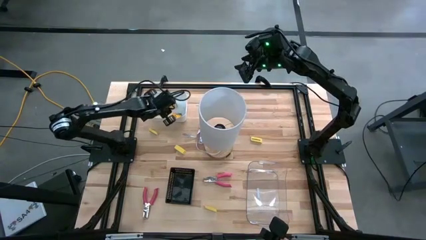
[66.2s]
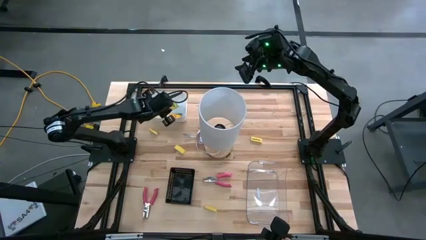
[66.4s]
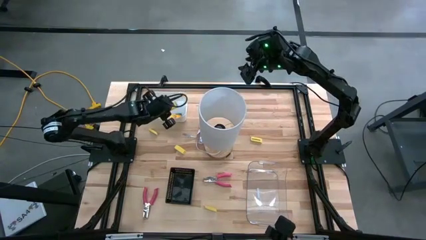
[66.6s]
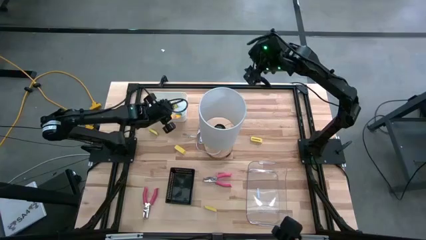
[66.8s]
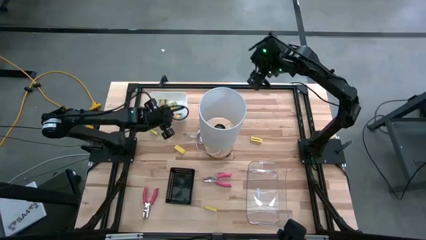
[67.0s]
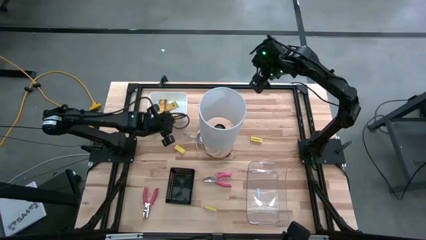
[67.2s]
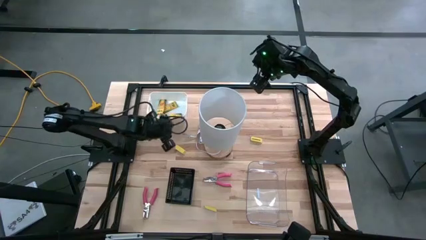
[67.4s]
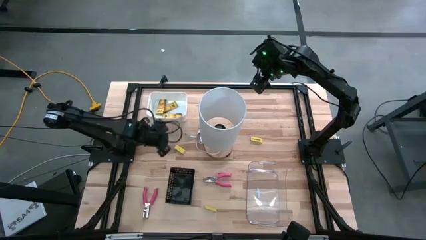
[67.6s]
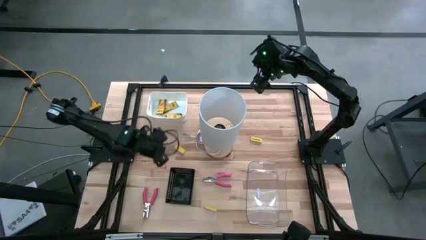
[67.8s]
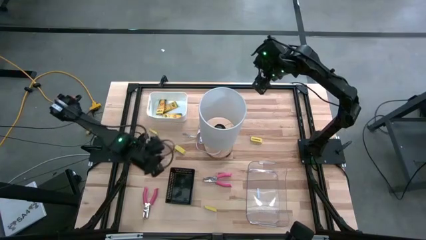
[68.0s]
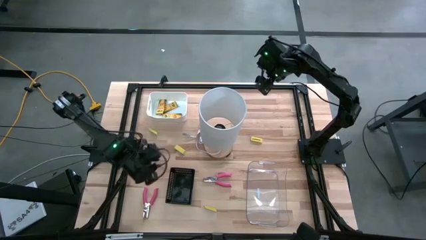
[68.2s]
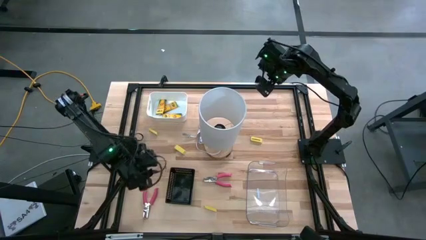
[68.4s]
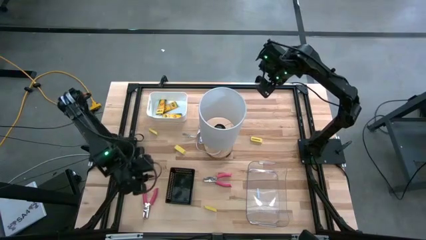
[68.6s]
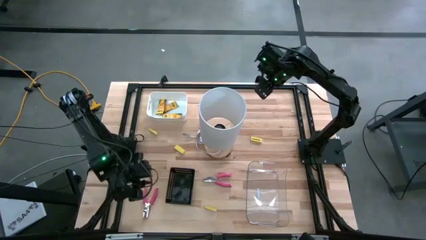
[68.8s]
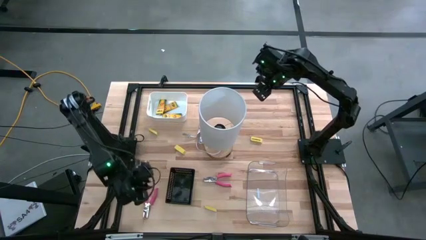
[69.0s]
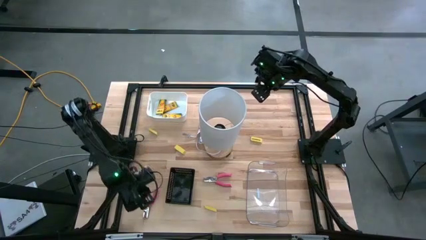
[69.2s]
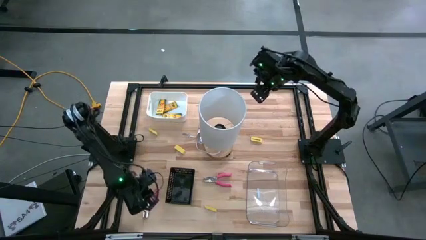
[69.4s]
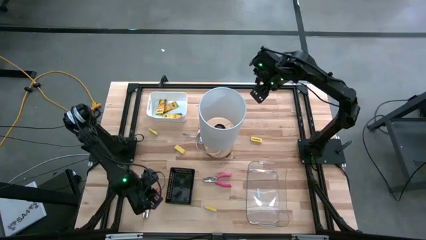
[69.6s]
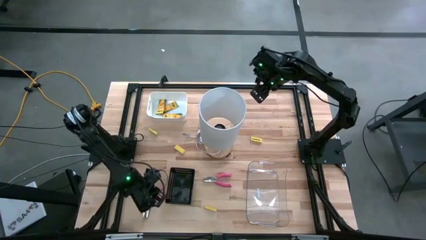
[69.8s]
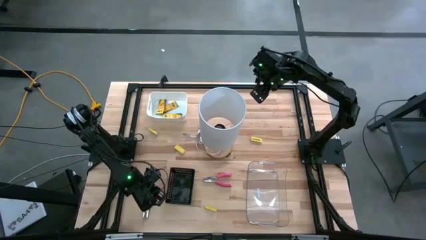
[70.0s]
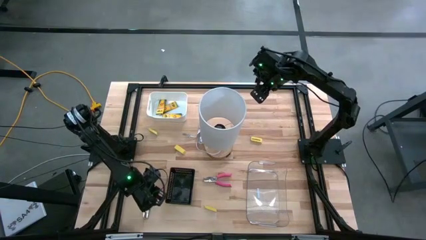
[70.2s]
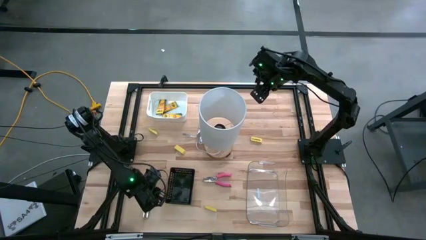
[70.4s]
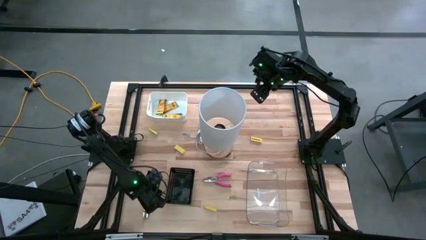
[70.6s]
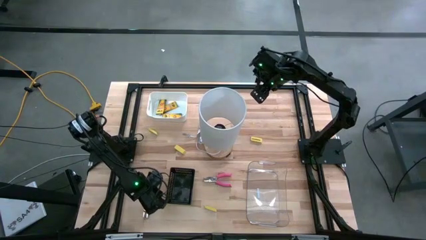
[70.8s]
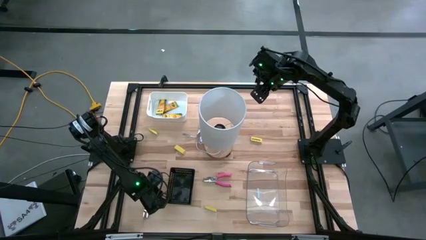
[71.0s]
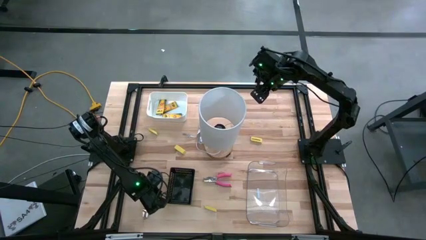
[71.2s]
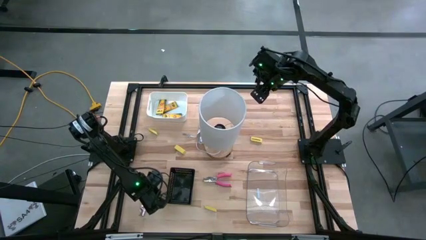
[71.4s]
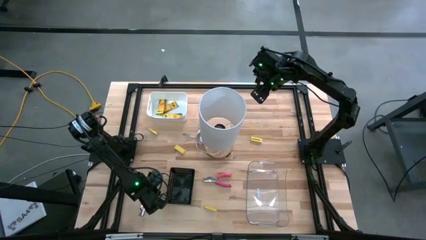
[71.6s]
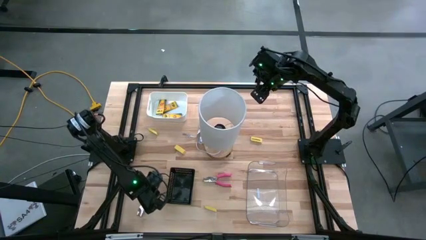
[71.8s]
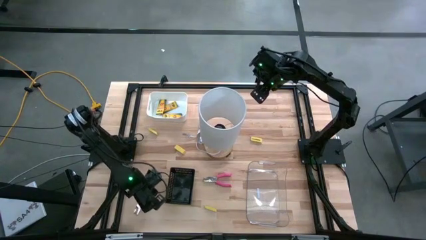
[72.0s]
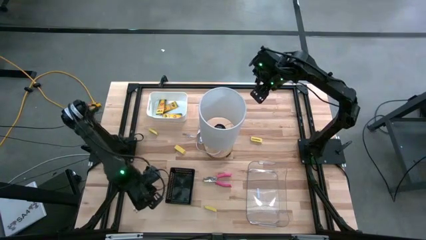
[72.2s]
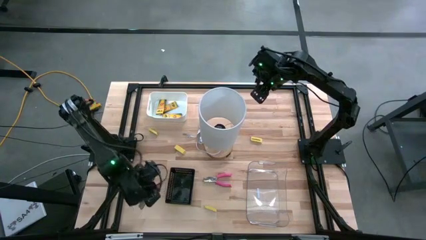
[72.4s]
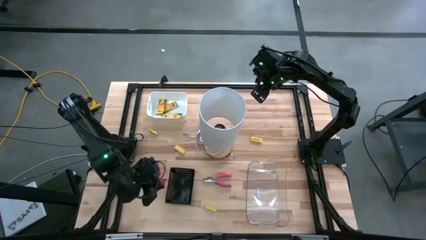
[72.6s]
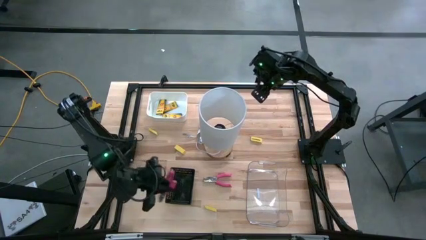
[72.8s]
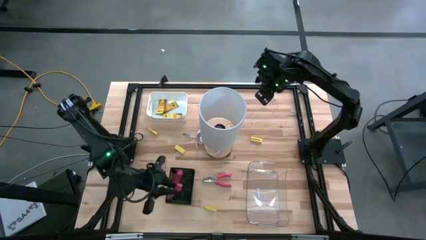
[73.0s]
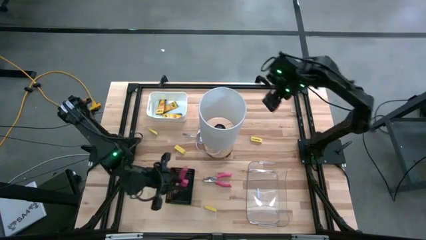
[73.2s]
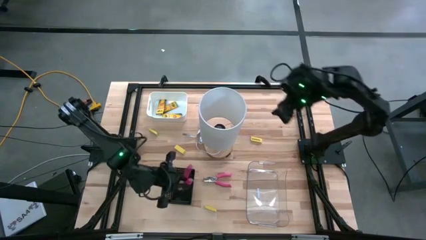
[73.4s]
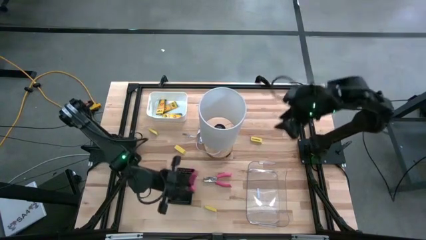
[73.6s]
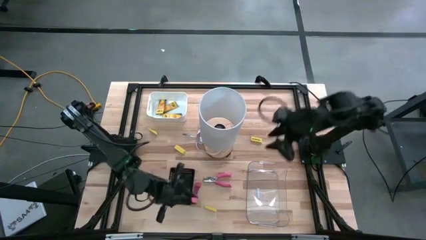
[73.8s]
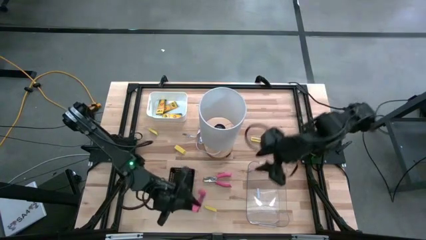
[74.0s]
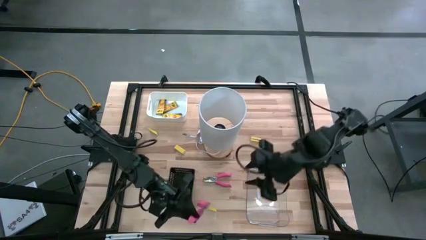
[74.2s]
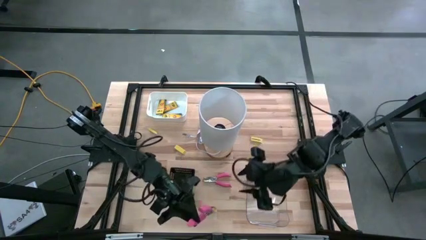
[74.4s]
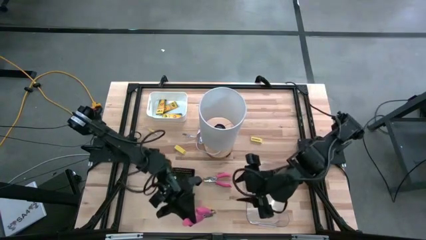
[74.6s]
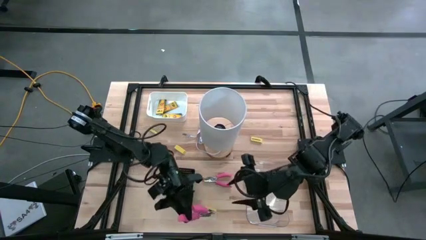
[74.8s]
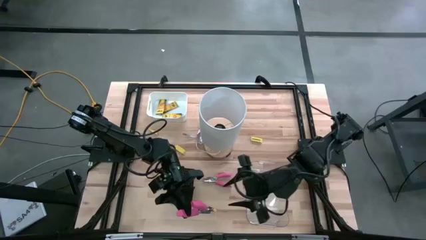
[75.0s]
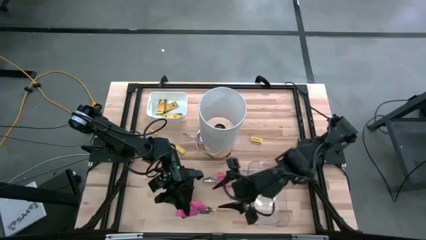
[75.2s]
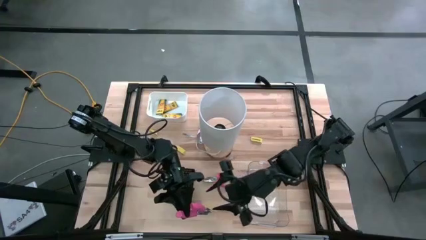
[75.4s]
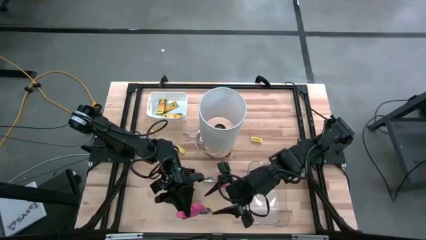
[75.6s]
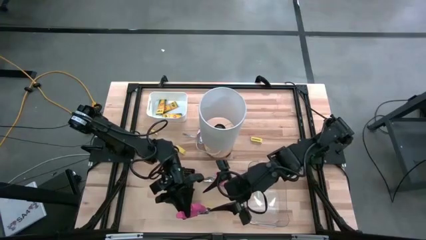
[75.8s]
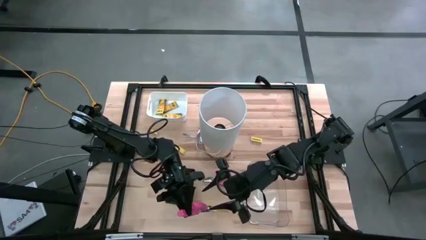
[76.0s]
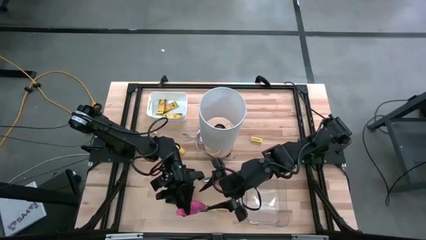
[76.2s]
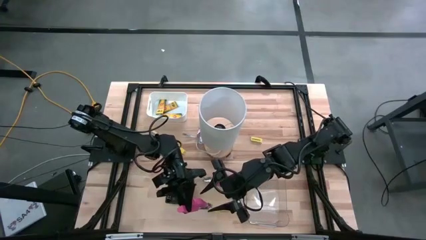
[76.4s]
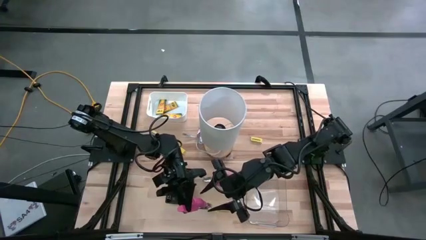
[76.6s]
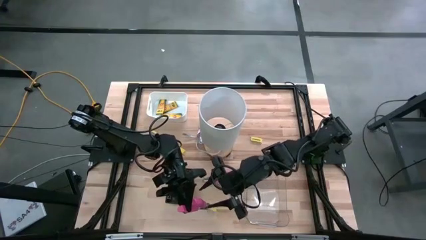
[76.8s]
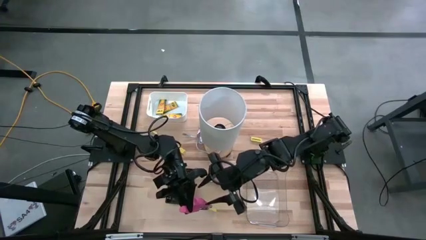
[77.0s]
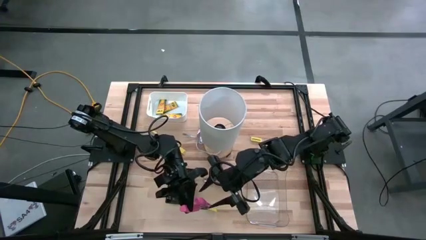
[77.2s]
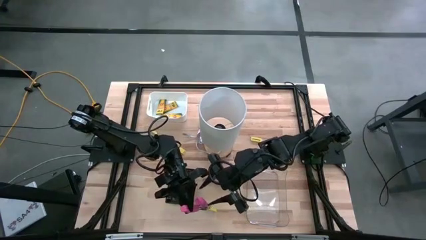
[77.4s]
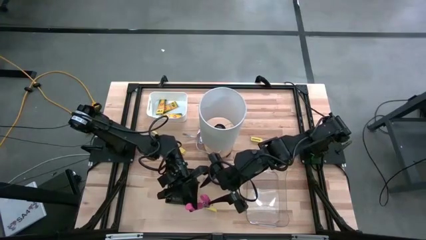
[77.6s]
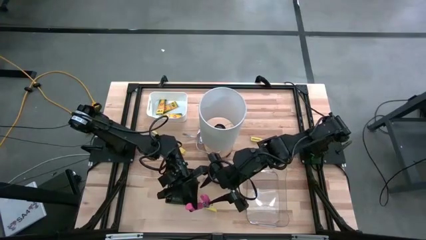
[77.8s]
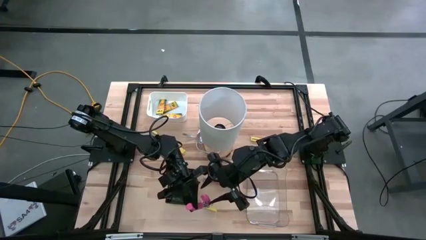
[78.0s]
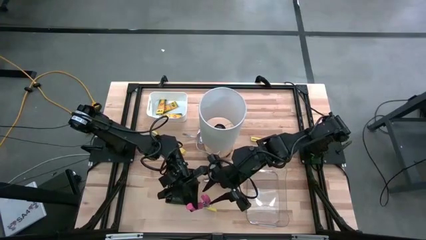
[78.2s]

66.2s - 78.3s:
Task: Pick & Place School Supplies
Put the pink hole puncher into the transparent bin

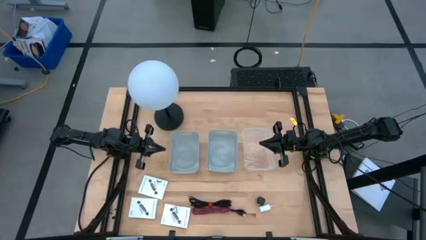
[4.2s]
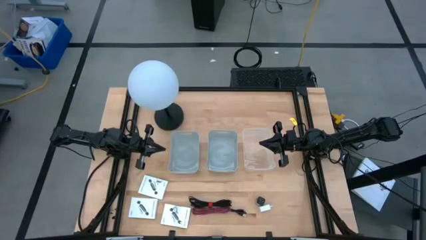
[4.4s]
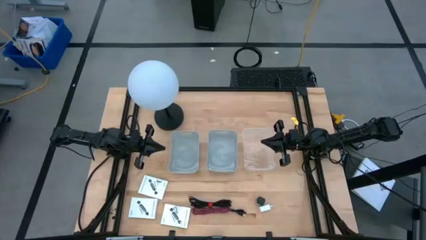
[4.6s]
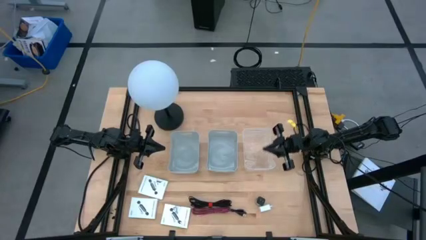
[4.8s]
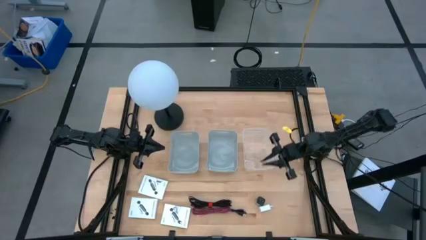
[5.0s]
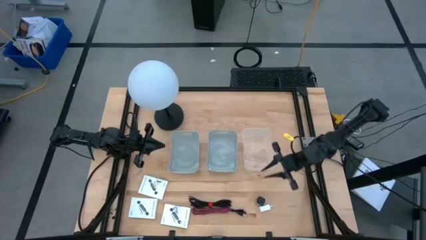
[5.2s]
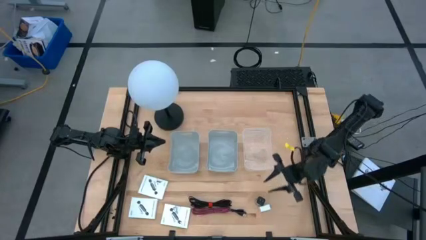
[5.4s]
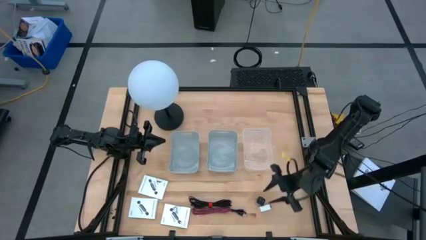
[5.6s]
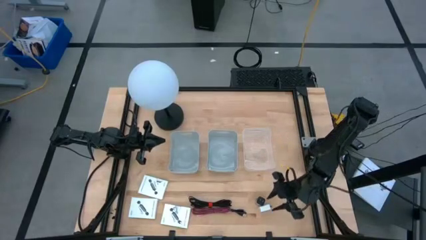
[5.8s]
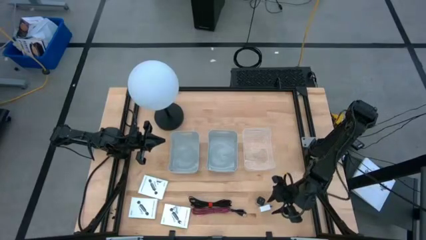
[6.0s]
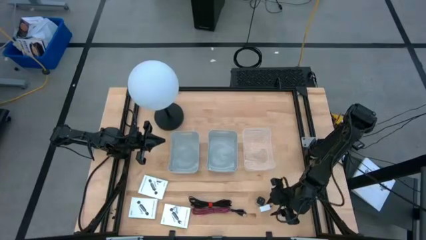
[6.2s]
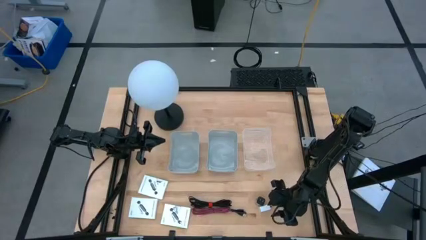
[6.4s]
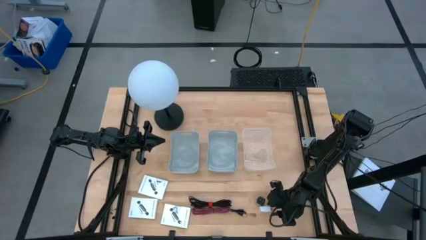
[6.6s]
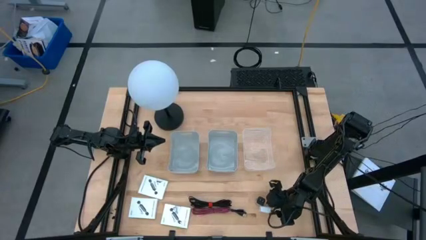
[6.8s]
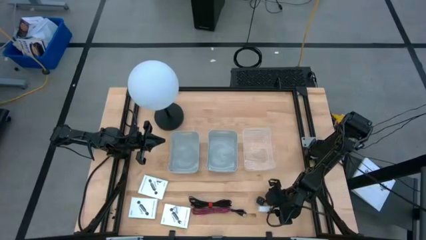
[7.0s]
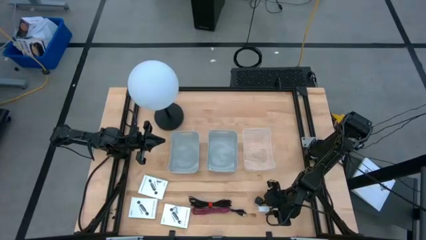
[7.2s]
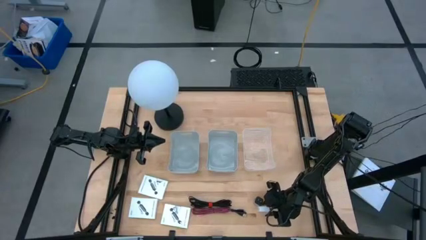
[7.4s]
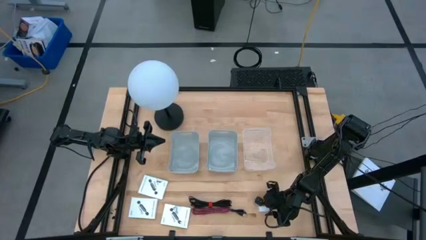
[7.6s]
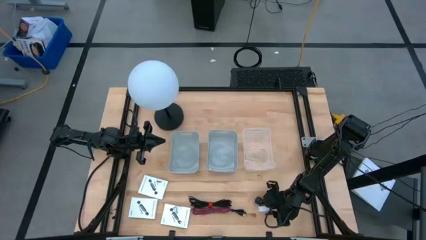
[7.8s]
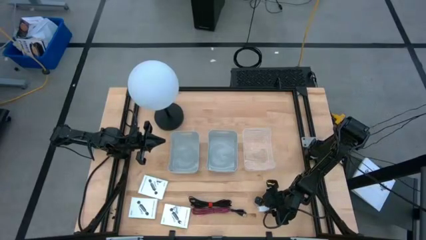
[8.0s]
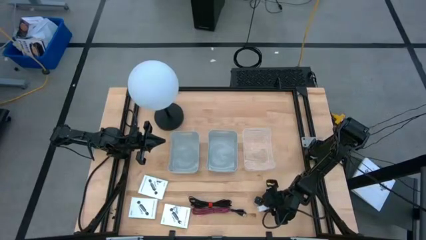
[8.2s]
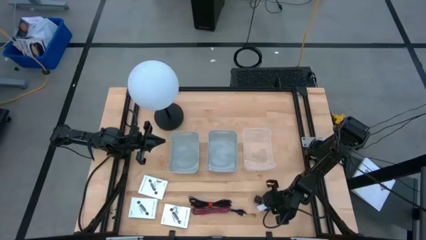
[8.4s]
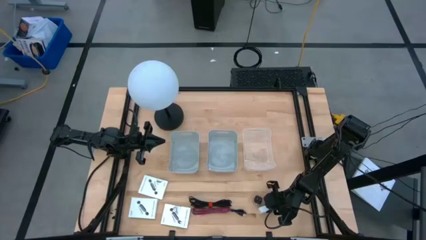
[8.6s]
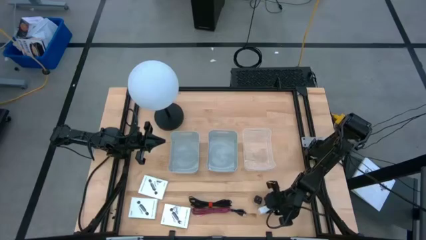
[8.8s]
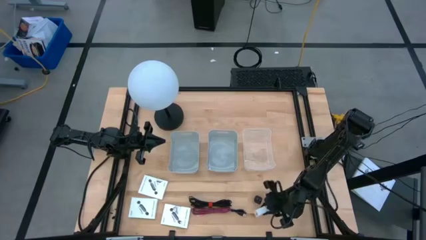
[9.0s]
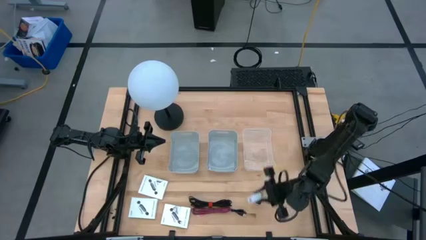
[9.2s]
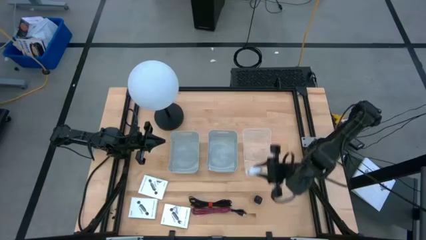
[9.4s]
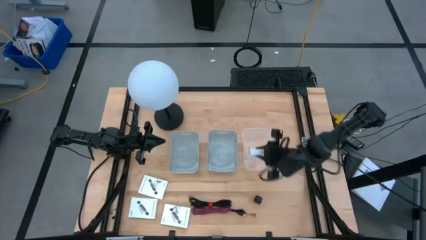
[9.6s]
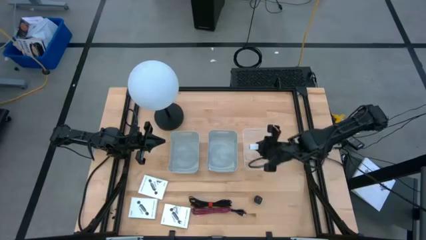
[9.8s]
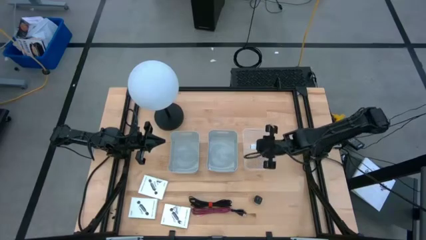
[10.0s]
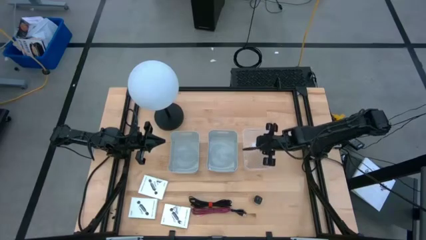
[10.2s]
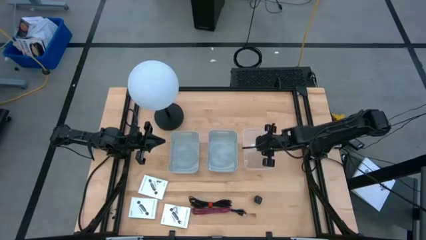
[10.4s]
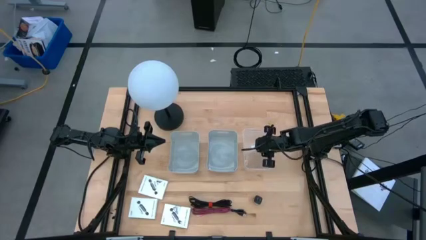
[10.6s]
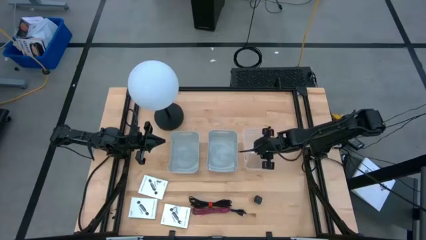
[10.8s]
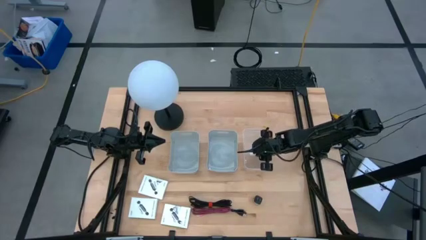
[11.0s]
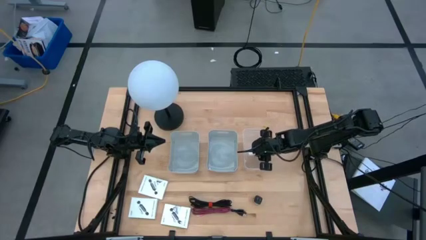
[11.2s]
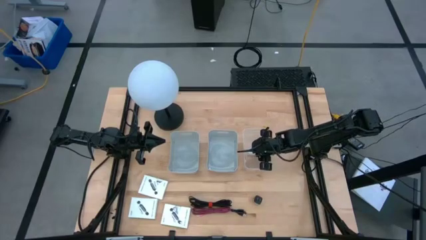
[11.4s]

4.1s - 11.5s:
Task: Pick and place items into bin
Put the white charger adapter into the transparent bin
